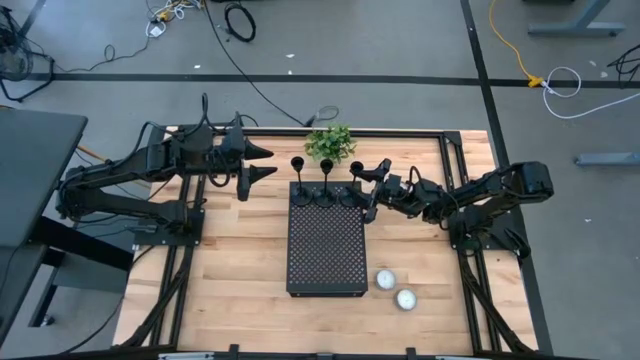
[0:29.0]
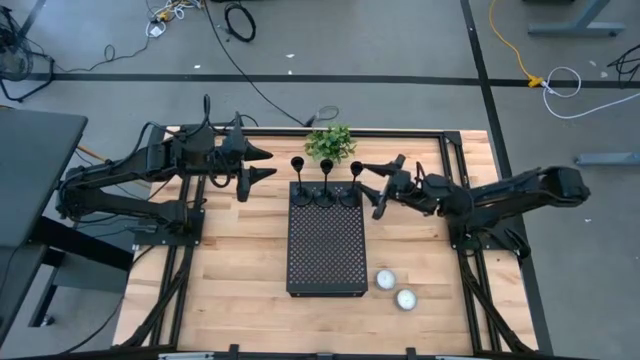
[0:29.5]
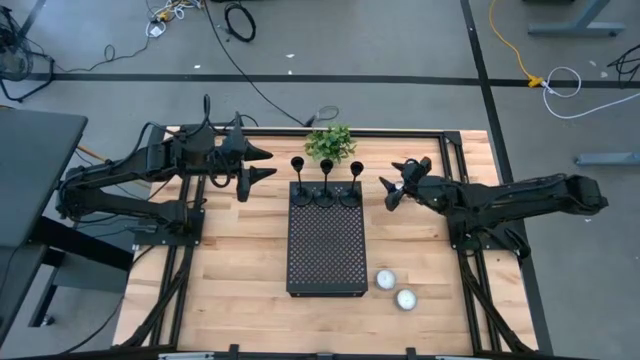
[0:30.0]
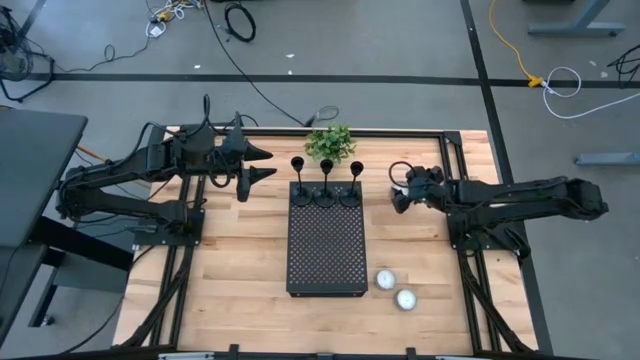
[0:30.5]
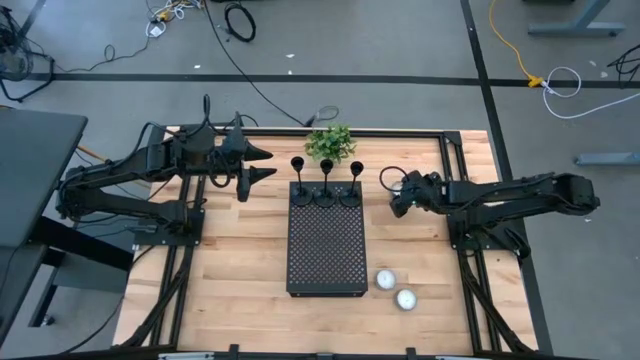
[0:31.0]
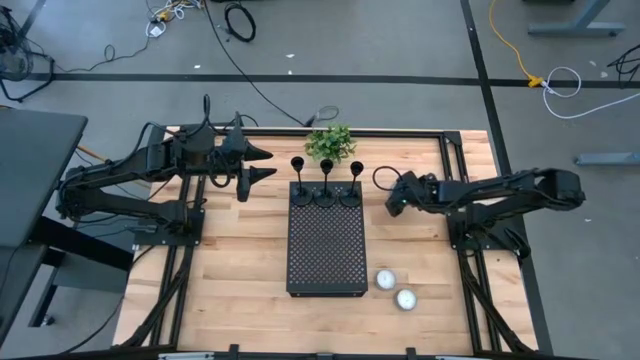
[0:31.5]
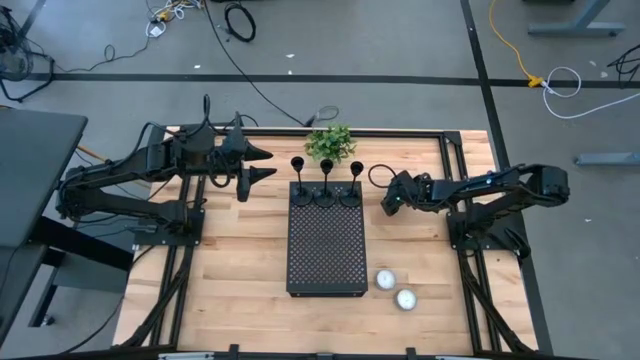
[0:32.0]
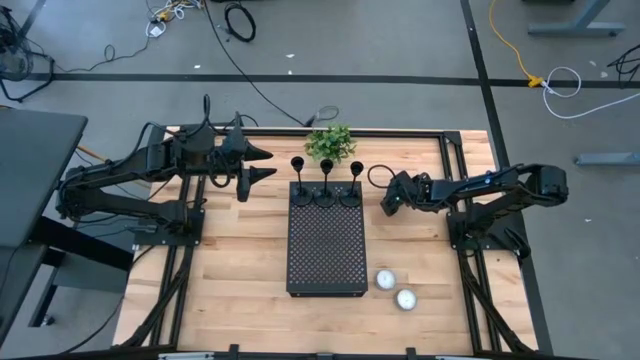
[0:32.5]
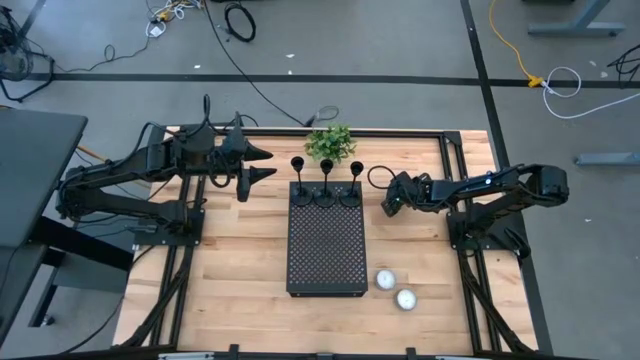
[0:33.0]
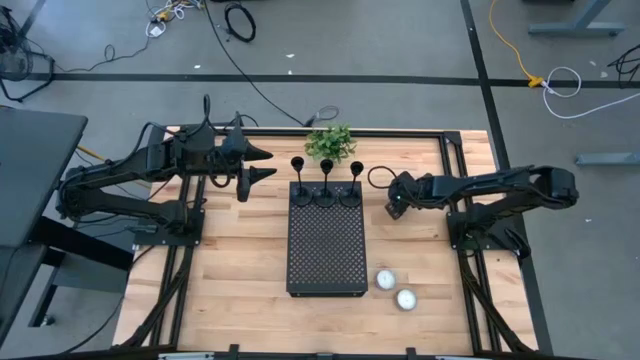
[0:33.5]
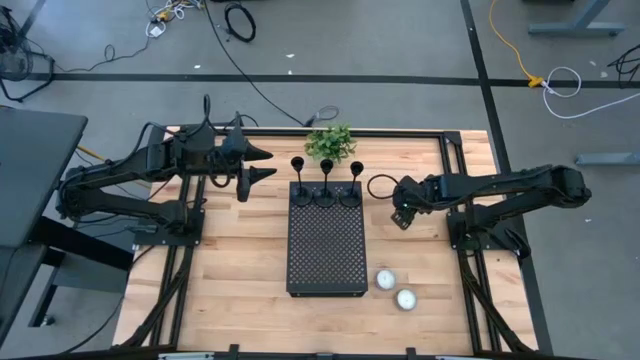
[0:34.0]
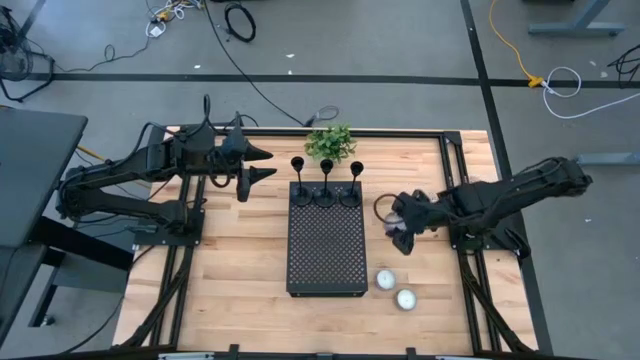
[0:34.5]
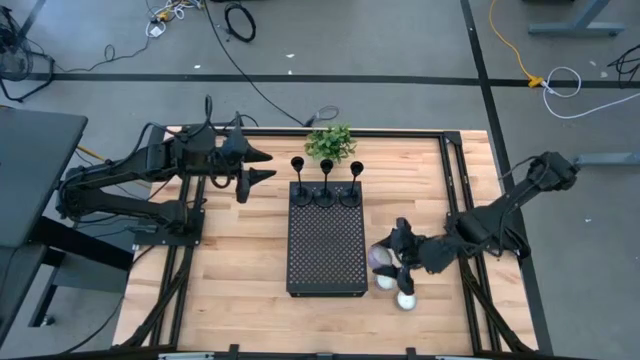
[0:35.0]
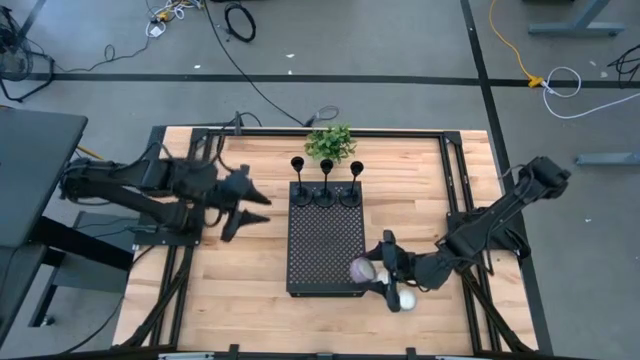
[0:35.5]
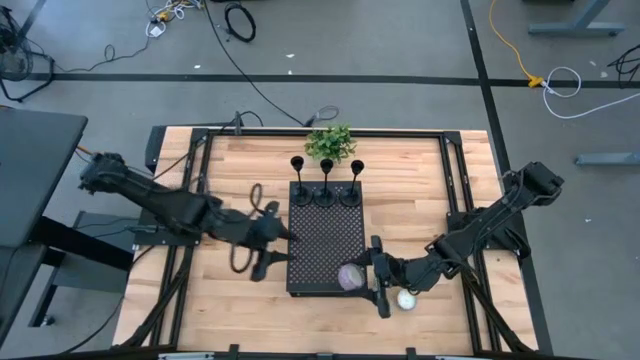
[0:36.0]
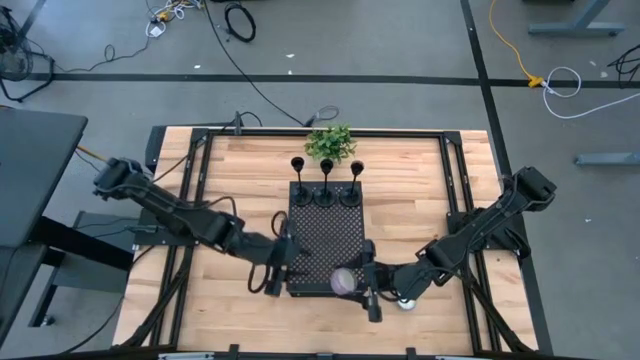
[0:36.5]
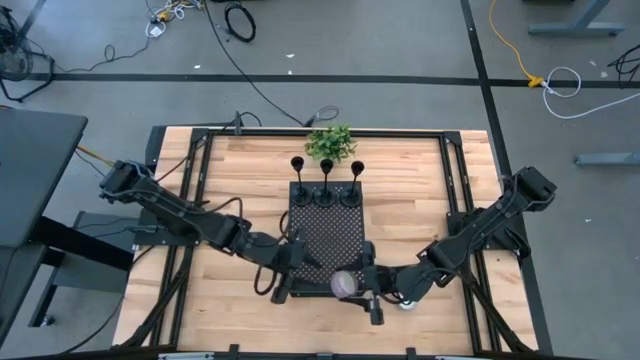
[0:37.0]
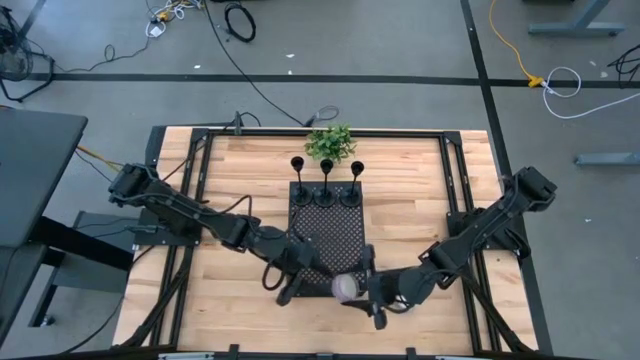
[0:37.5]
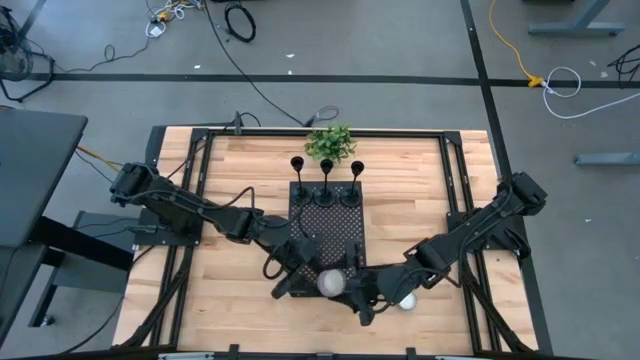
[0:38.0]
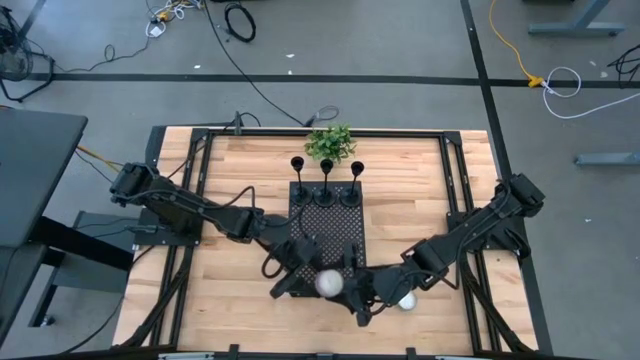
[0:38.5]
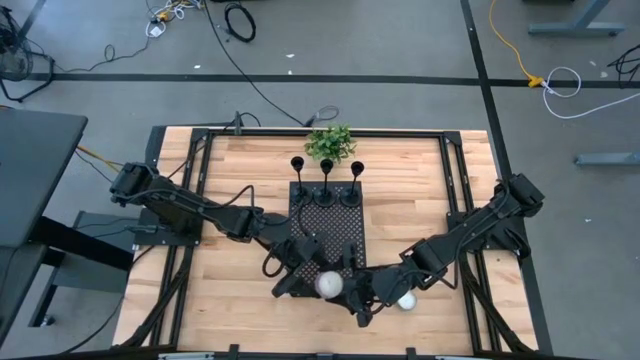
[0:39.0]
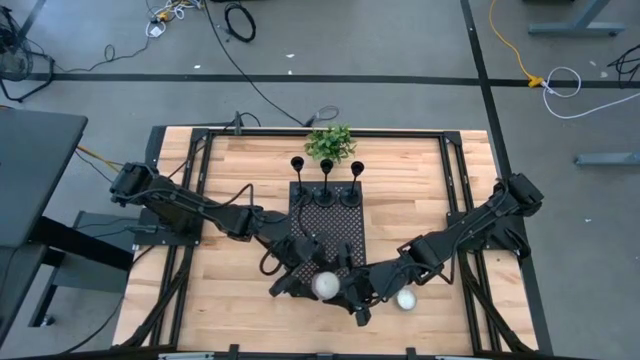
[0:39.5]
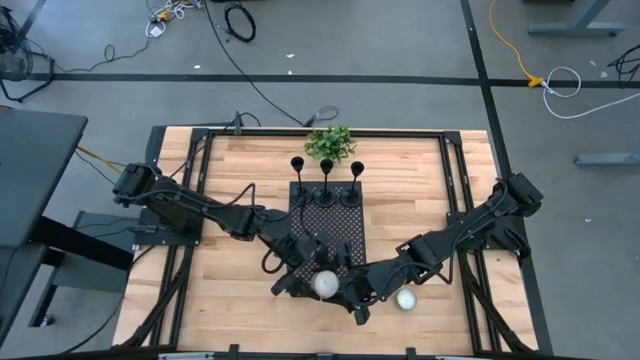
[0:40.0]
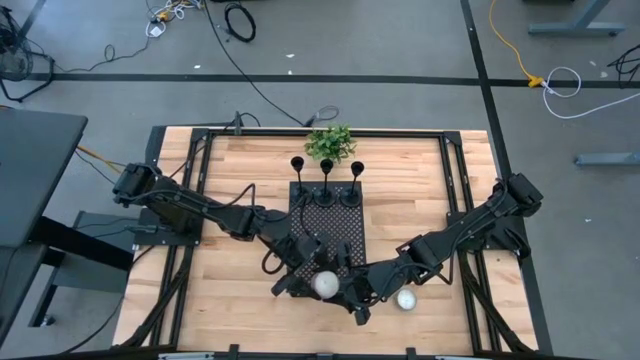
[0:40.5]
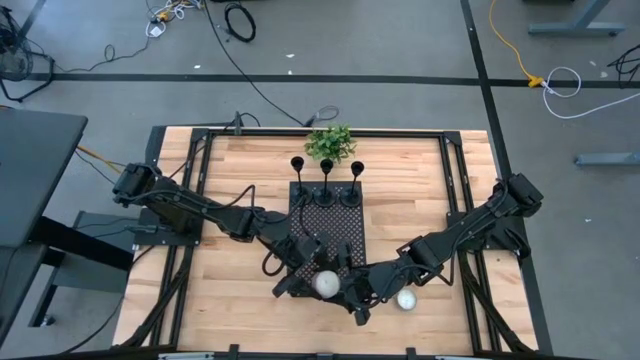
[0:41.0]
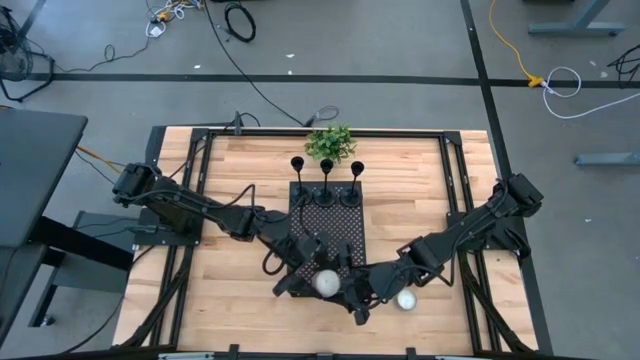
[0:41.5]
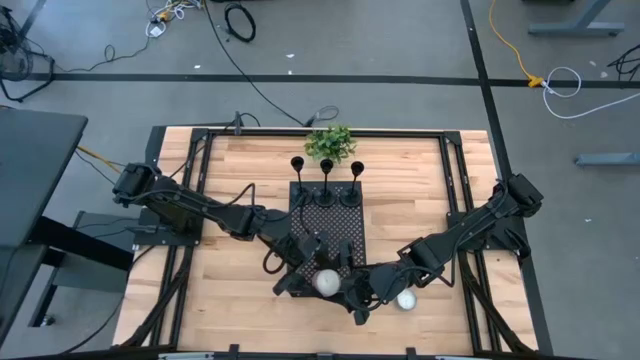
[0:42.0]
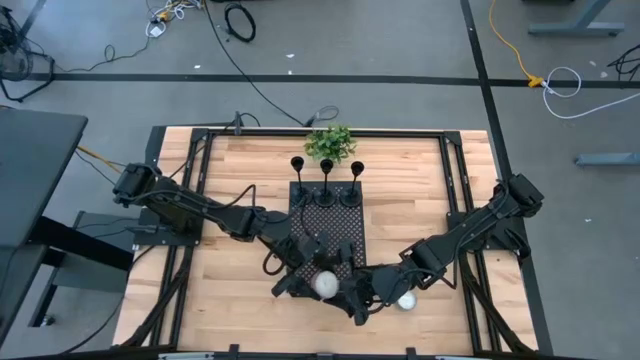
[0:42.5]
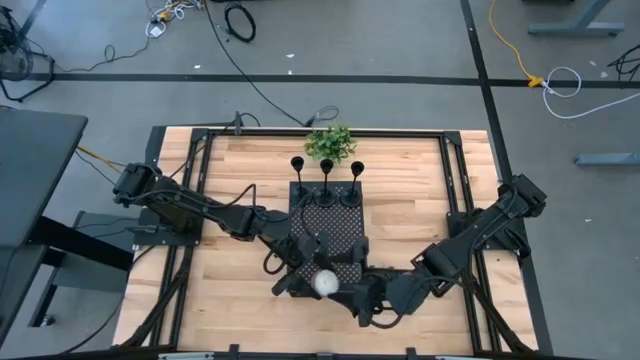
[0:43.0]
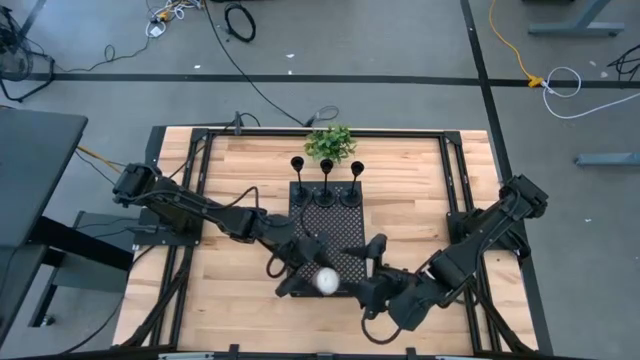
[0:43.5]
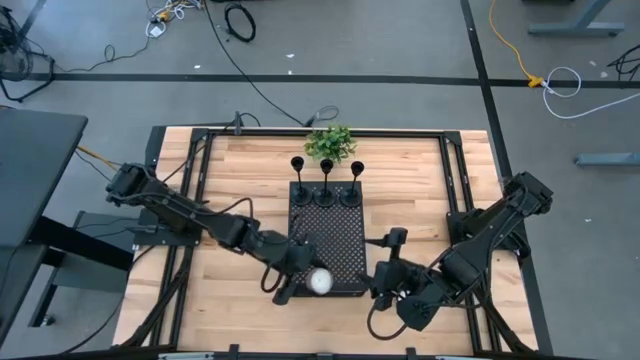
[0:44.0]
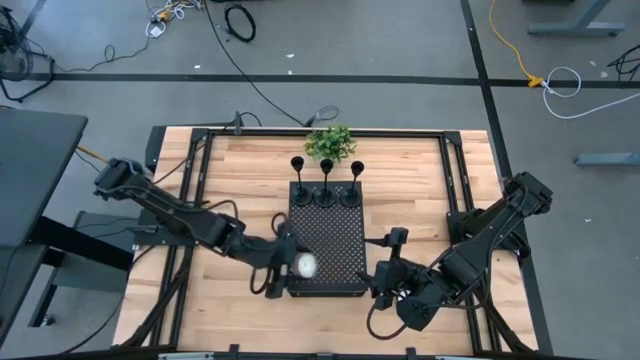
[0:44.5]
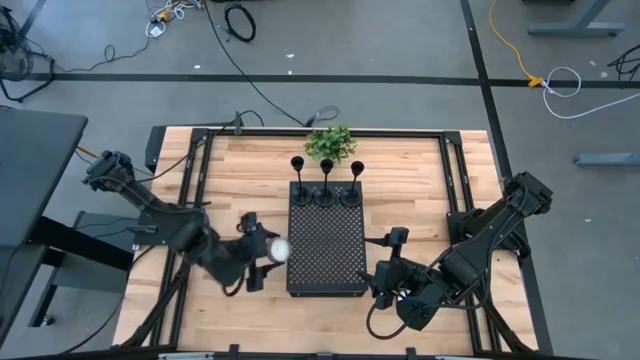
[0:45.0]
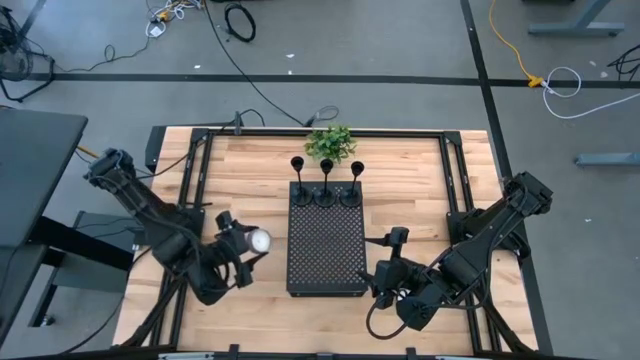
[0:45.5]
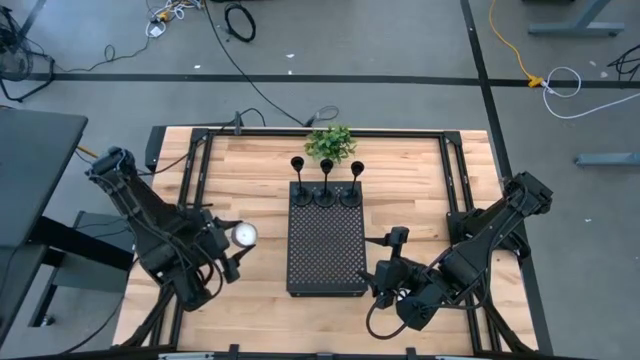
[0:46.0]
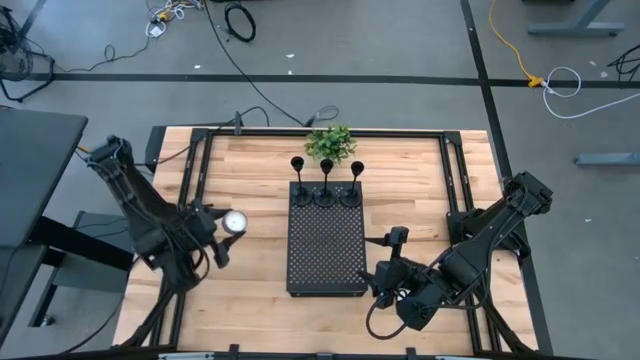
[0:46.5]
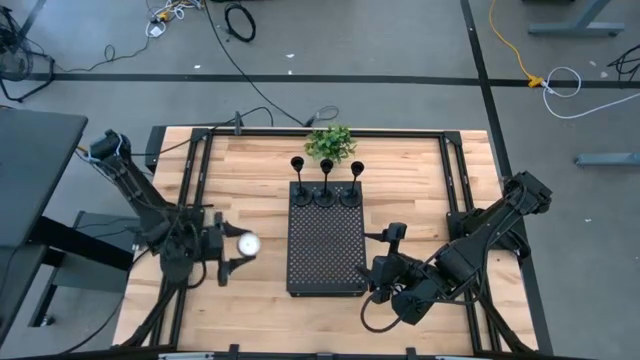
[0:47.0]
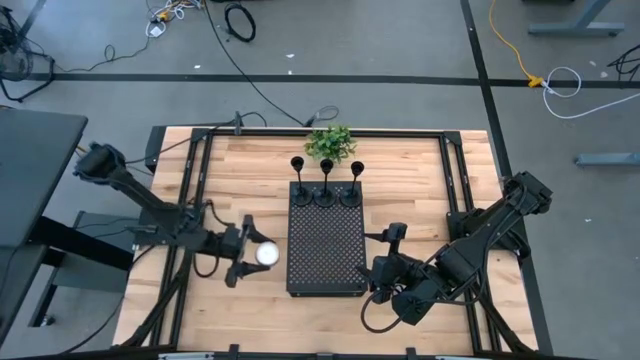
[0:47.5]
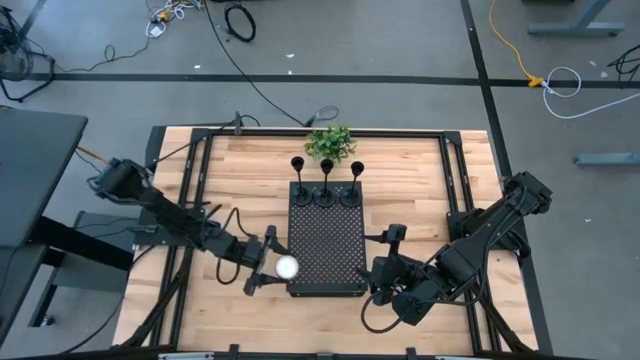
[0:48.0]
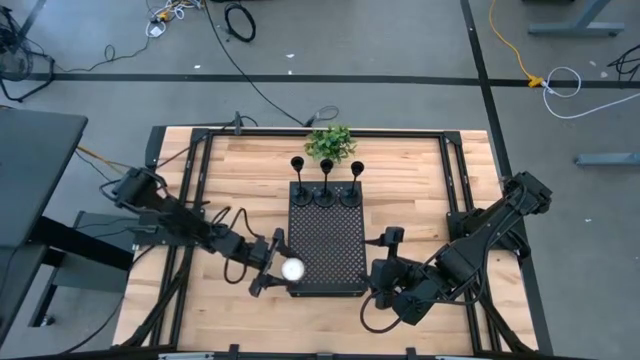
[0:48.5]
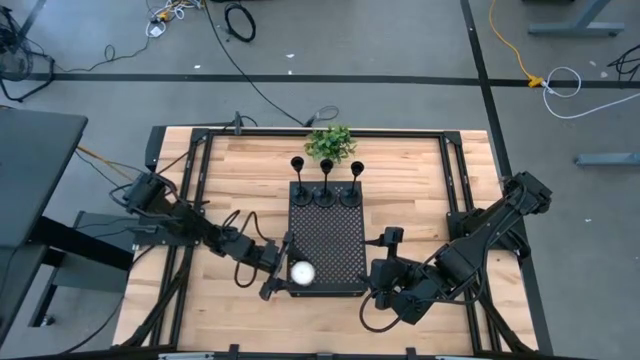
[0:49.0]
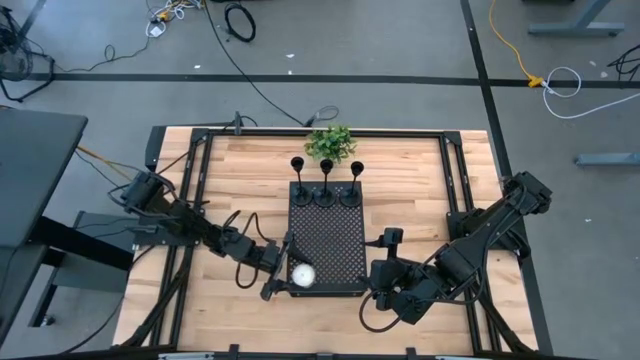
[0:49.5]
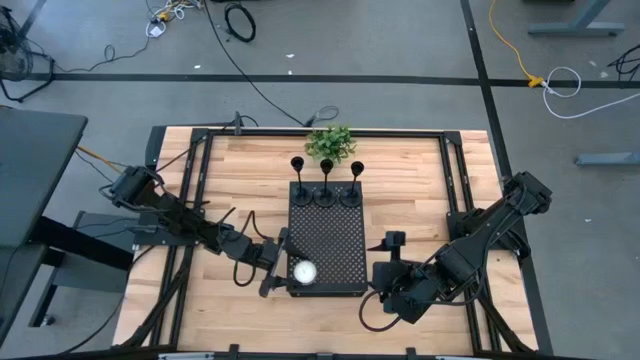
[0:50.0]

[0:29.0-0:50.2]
Task: Pick & Place candle stick holders
Put the pink candle on the shelf
